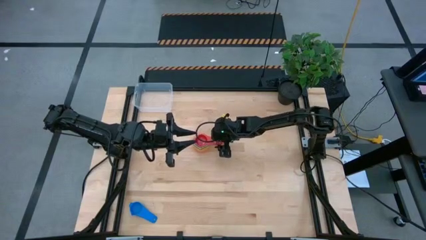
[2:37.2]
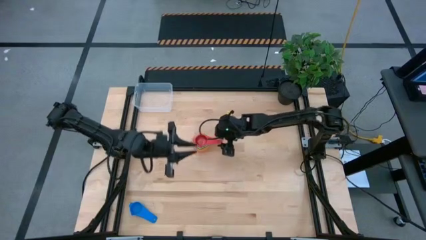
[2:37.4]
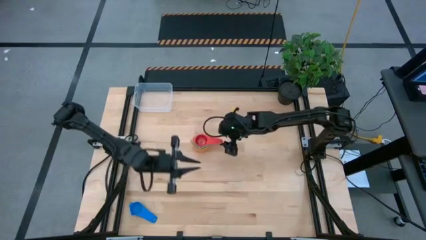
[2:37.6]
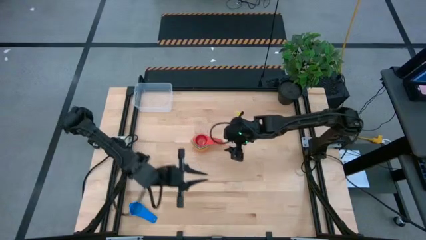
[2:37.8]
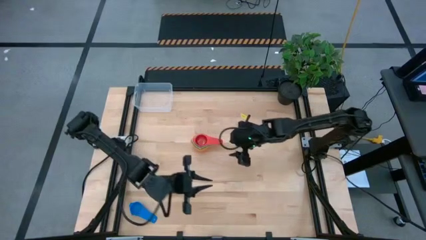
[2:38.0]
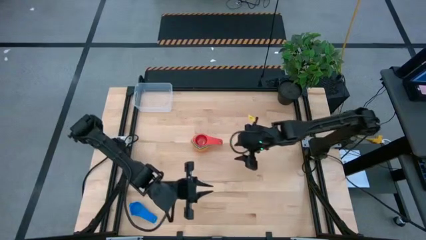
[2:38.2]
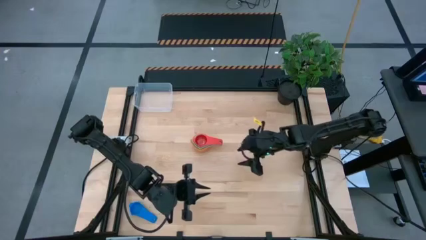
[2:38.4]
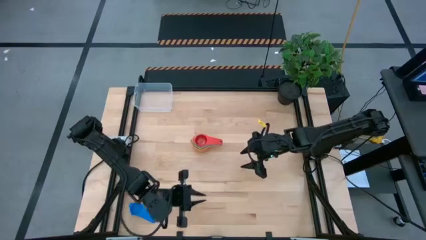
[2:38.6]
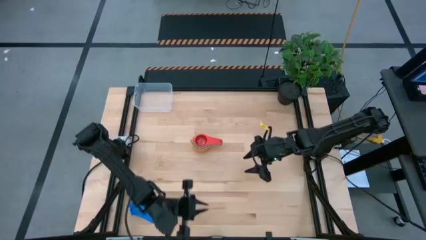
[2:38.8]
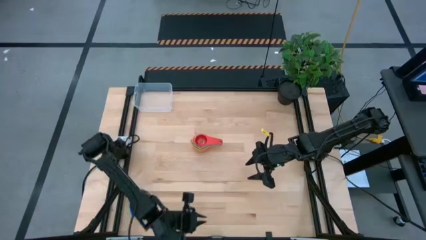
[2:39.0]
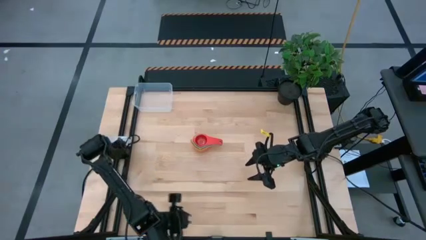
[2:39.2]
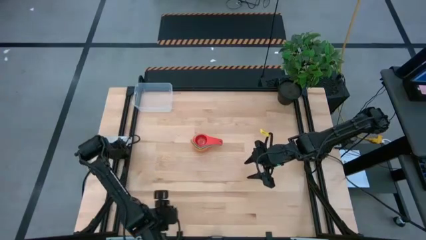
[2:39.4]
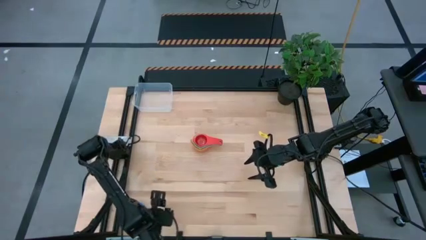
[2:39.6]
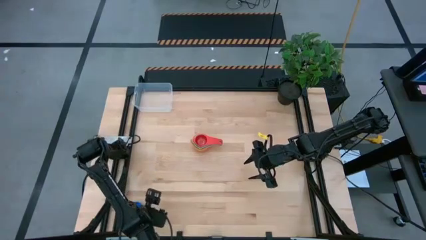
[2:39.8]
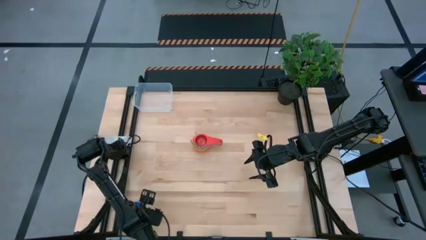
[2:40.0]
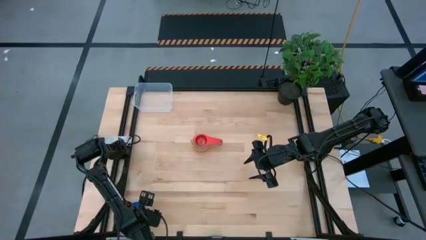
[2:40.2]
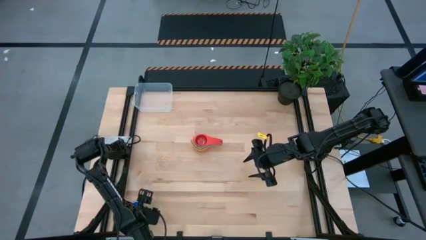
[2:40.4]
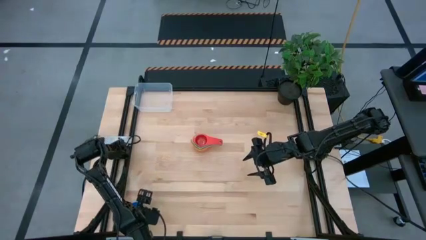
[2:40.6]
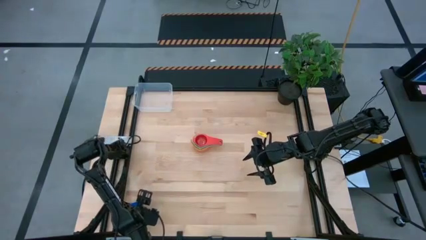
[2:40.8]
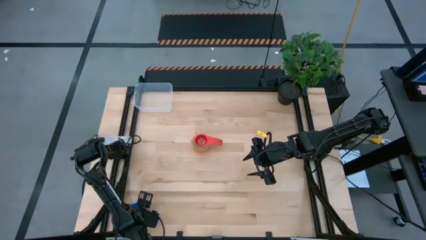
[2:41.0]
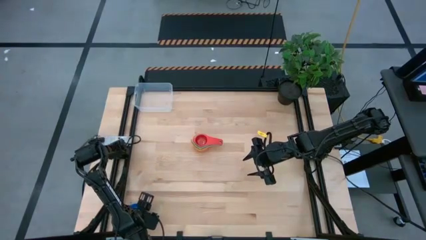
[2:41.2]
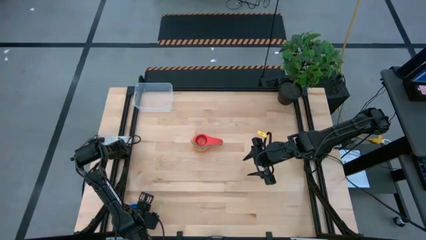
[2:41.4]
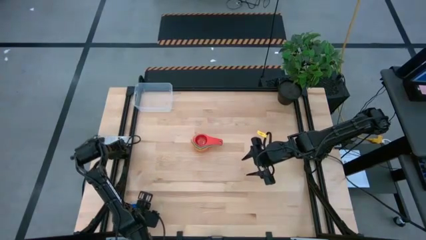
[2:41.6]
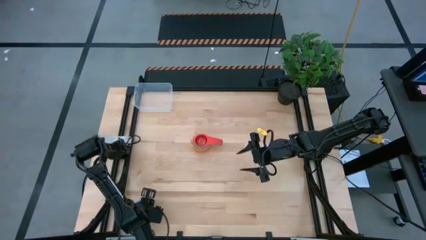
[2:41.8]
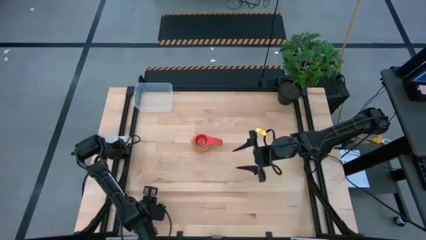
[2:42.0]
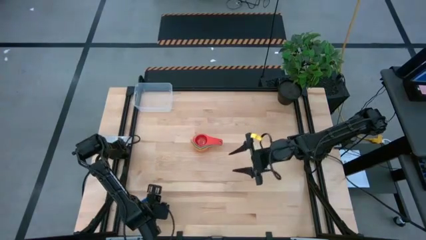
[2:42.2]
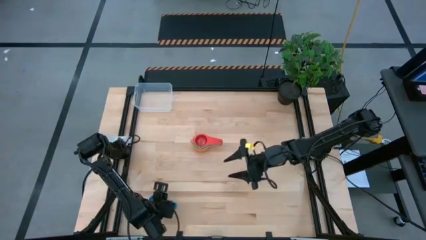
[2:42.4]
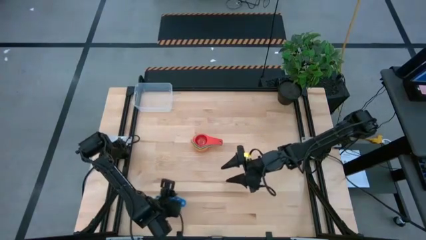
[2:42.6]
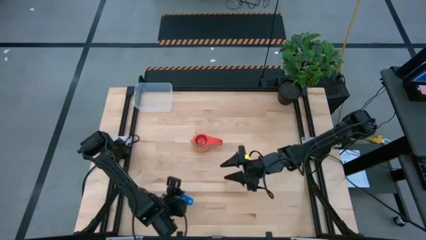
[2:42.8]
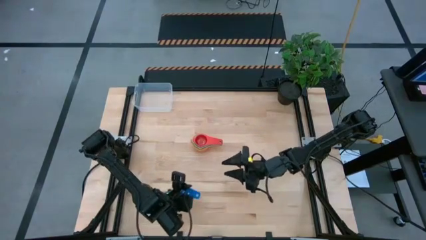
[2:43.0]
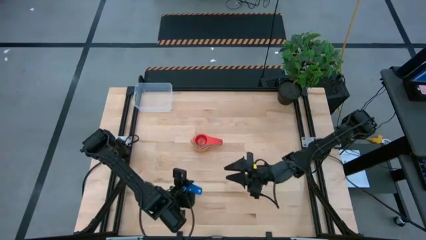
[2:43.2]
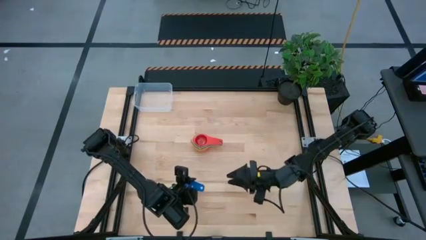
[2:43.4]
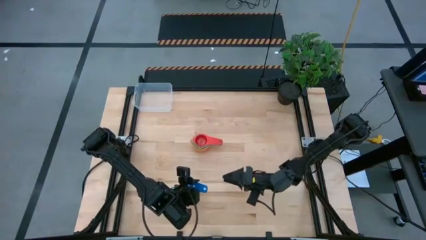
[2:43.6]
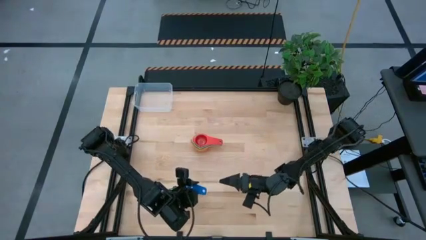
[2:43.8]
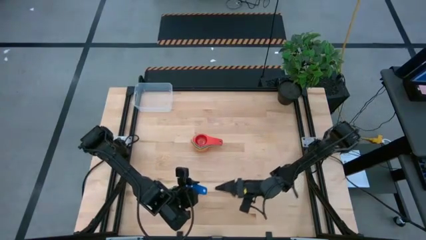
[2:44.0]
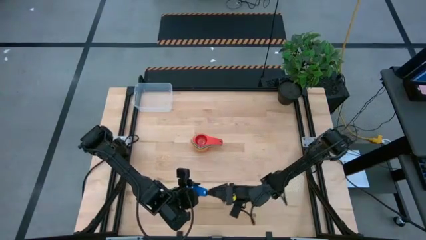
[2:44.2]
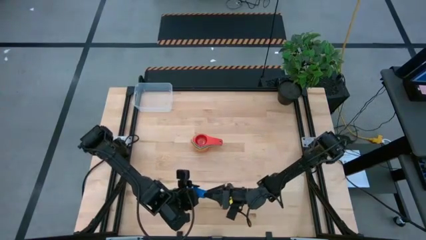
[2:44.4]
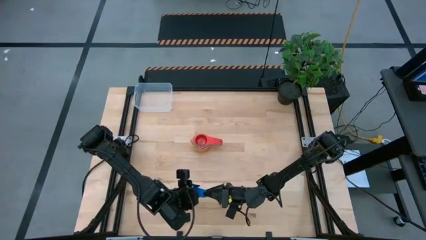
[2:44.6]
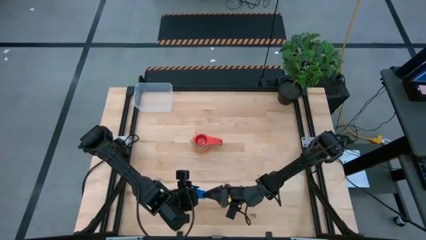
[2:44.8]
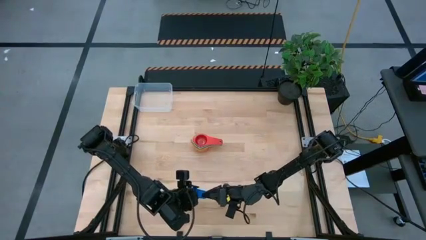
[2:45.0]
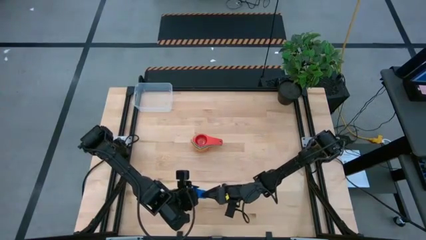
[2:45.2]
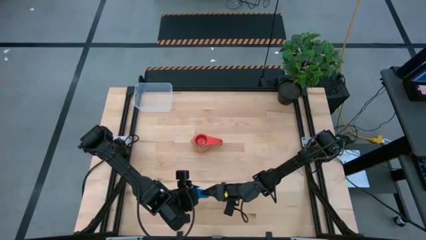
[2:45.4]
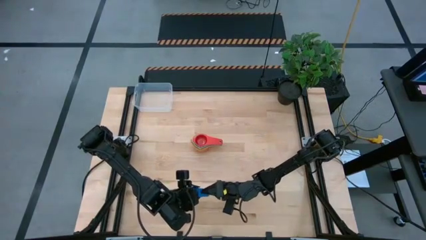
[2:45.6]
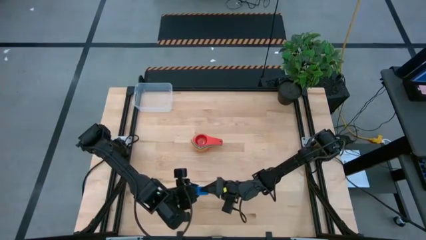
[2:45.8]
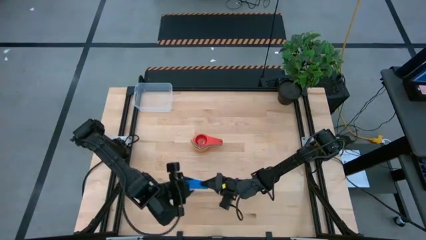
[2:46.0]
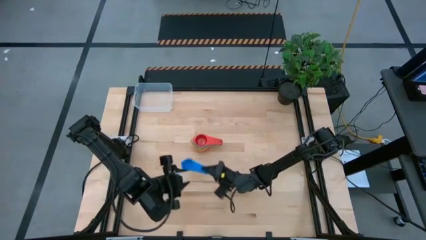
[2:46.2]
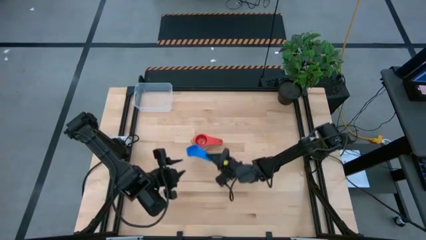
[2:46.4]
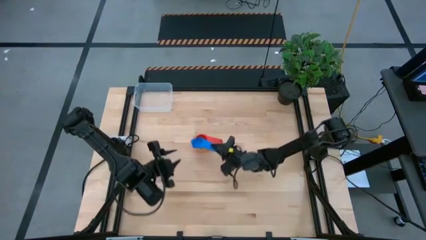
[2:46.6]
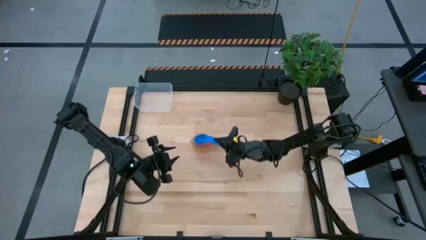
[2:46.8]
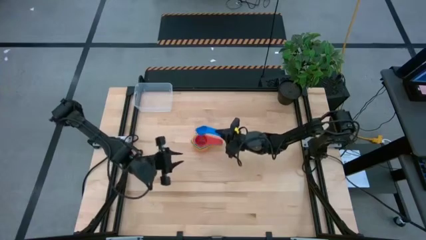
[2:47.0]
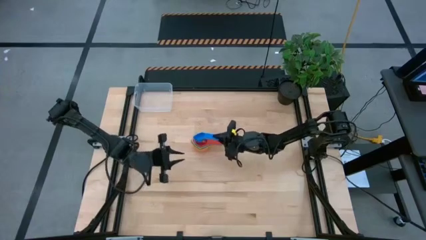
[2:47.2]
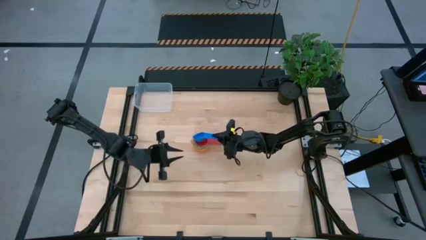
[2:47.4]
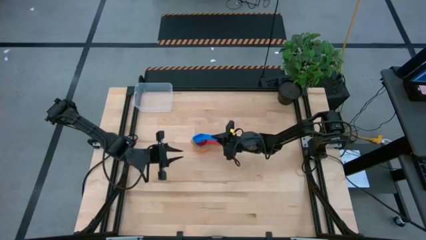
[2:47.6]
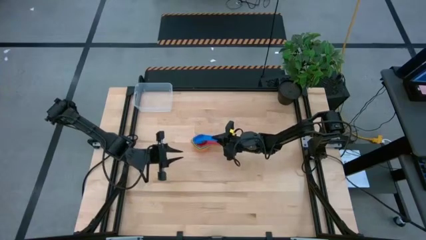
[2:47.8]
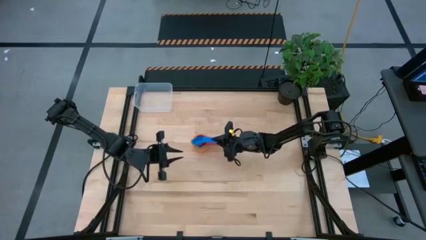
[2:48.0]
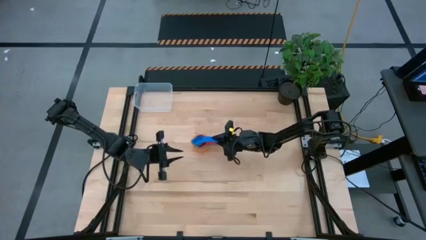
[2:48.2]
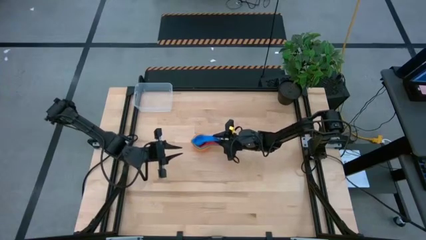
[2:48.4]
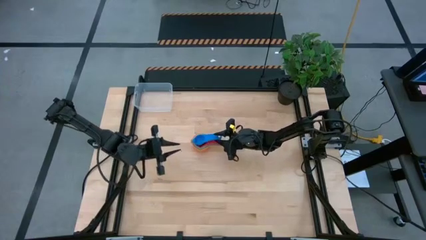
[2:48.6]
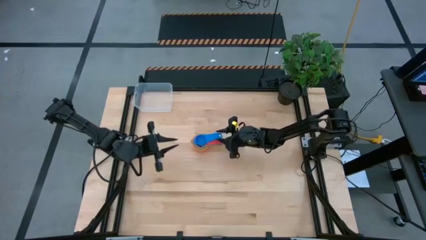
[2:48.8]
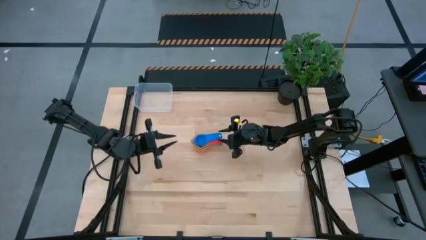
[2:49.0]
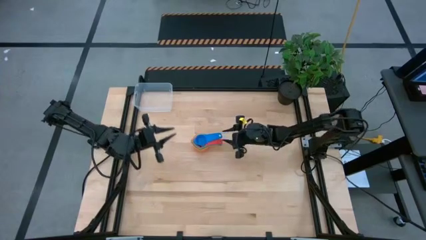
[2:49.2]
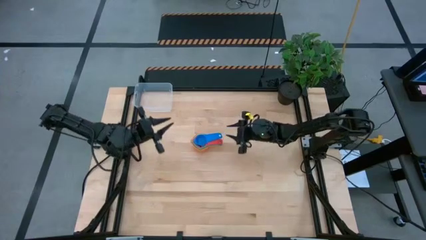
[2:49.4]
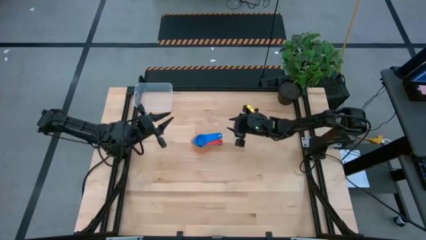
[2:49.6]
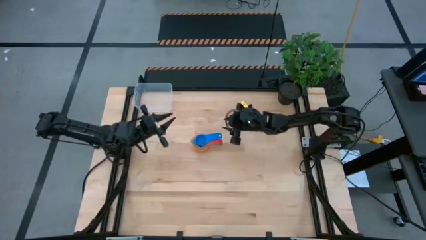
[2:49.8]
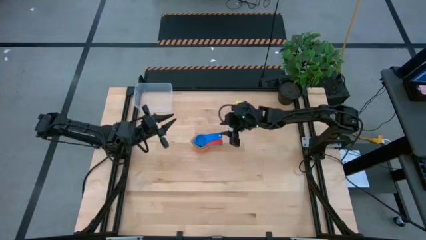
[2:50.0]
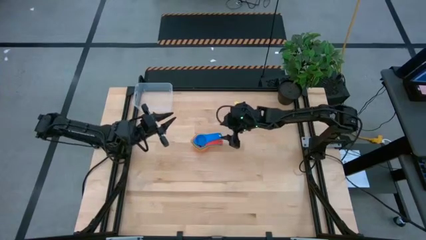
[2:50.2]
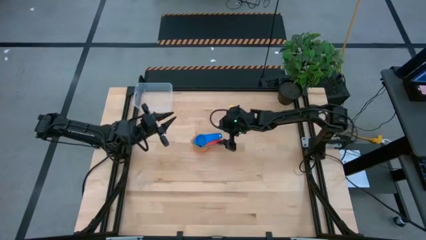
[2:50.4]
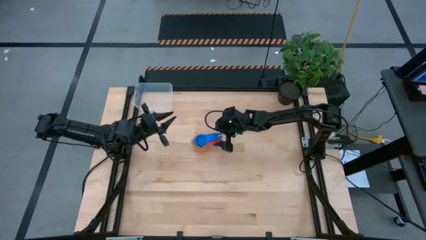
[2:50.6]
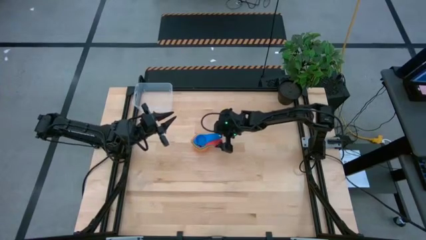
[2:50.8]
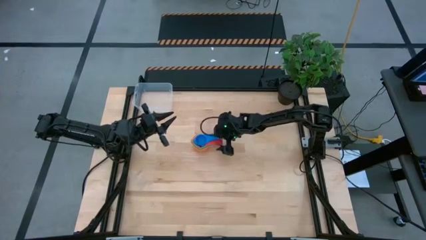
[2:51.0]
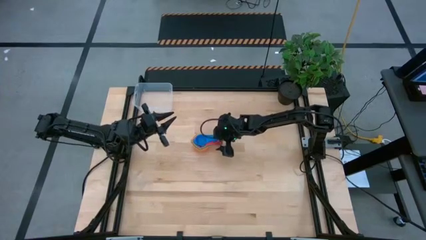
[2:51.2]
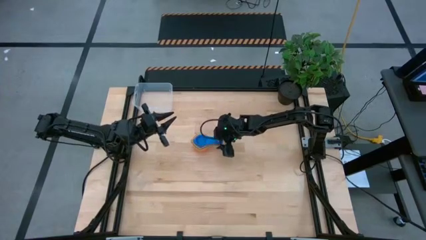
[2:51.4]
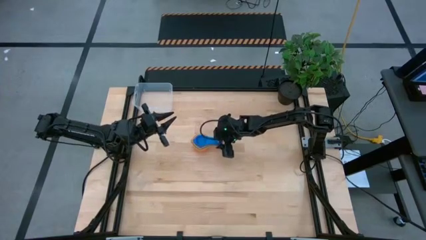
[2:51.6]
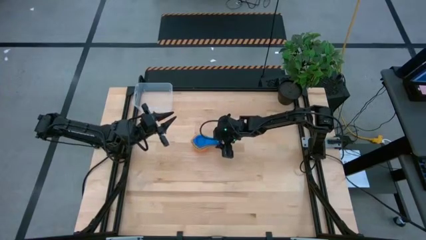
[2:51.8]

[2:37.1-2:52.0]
Task: Nest measuring cups in basket
Stack the blue measuring cup into the red measuring cup
